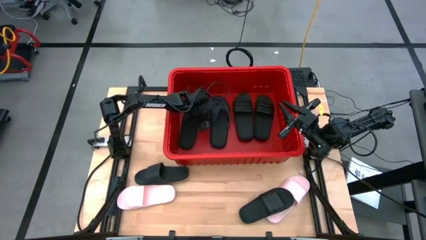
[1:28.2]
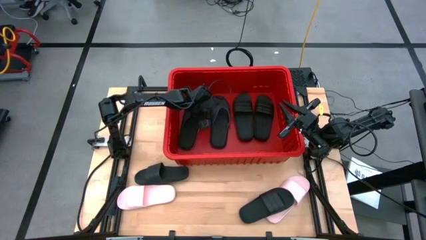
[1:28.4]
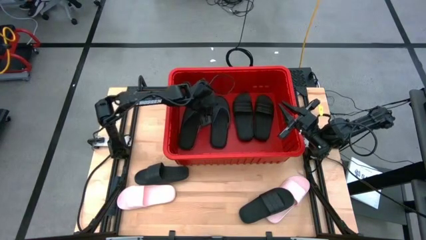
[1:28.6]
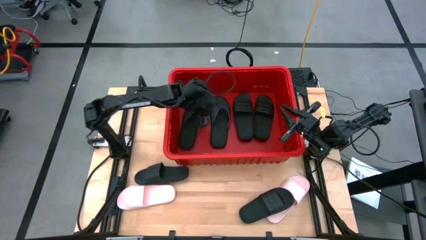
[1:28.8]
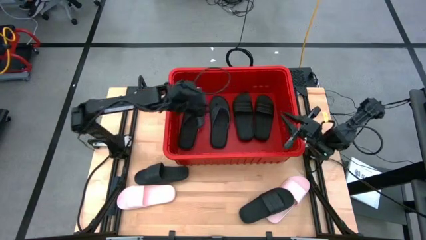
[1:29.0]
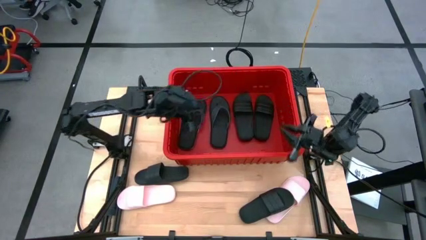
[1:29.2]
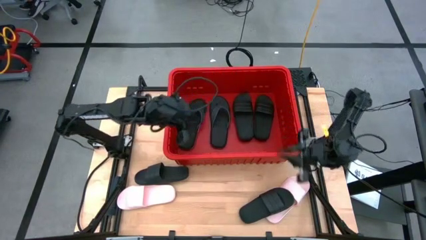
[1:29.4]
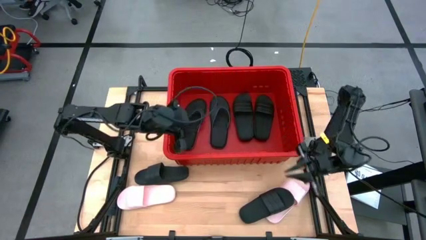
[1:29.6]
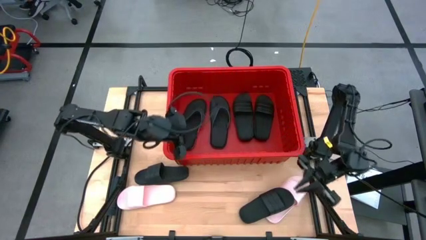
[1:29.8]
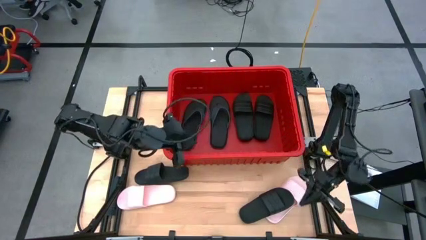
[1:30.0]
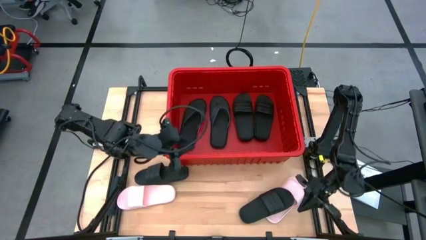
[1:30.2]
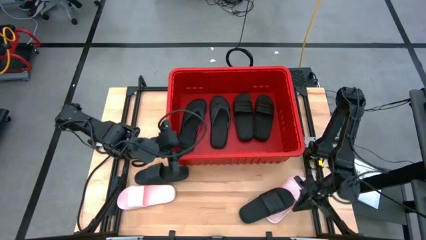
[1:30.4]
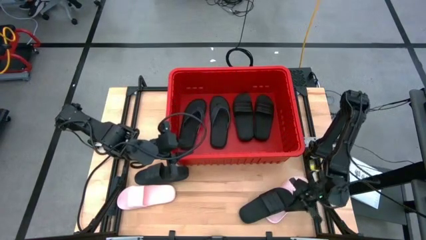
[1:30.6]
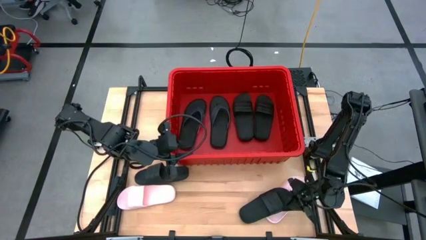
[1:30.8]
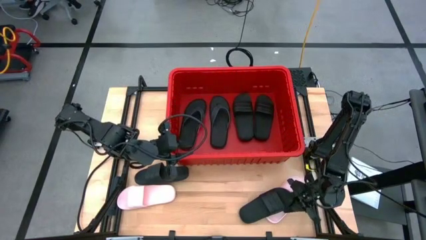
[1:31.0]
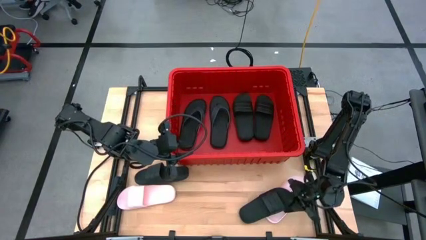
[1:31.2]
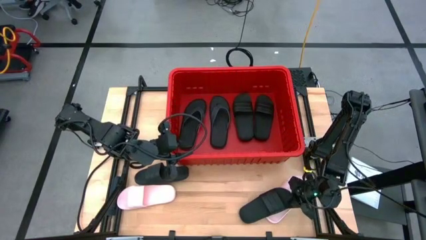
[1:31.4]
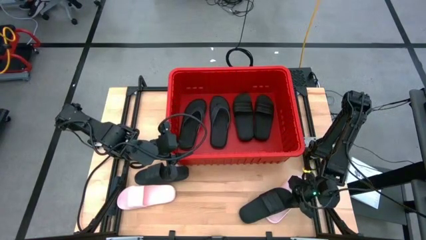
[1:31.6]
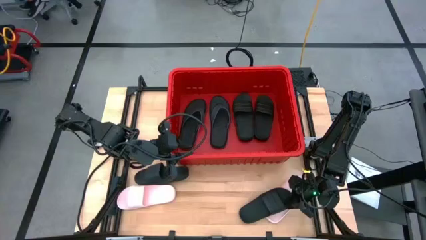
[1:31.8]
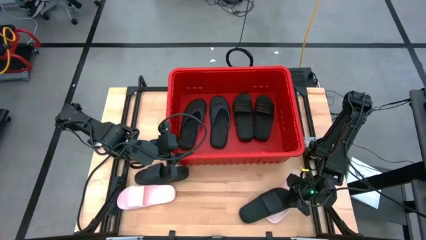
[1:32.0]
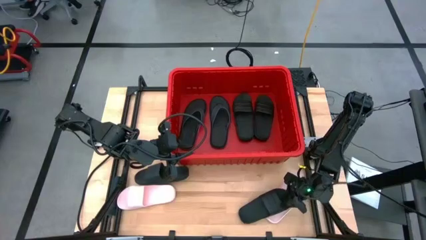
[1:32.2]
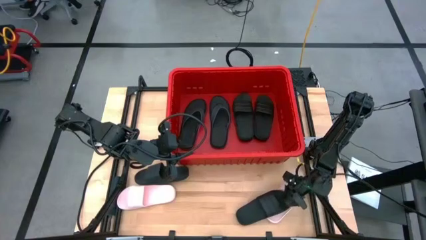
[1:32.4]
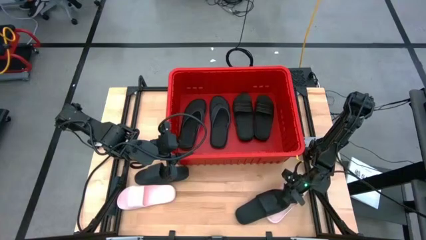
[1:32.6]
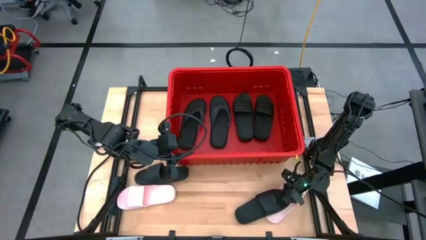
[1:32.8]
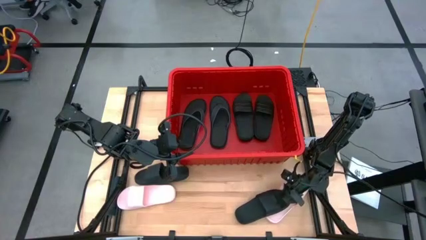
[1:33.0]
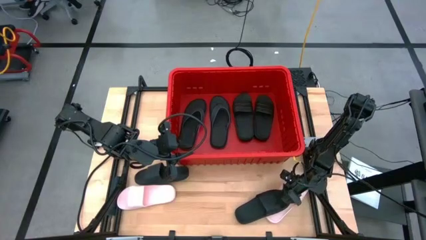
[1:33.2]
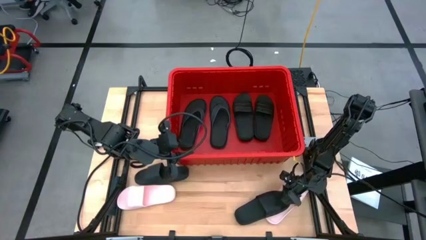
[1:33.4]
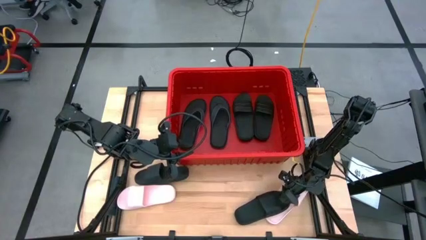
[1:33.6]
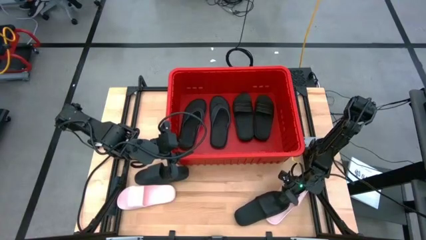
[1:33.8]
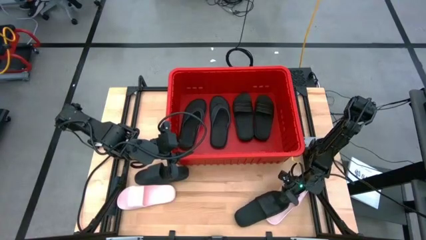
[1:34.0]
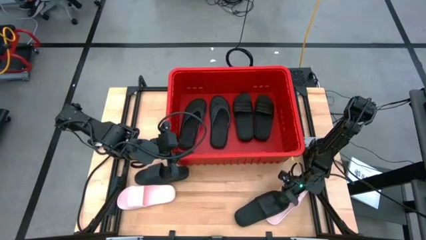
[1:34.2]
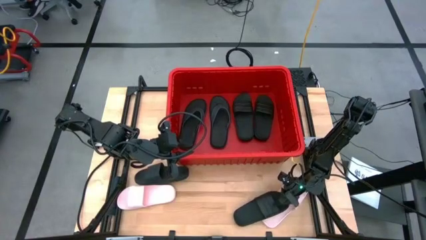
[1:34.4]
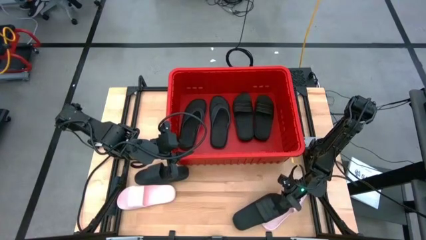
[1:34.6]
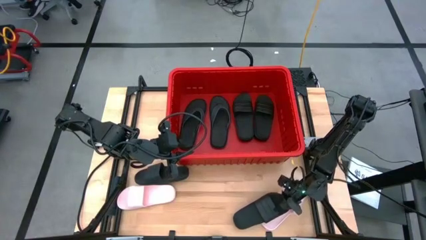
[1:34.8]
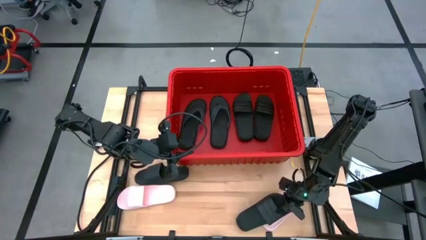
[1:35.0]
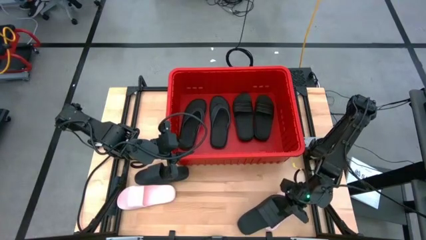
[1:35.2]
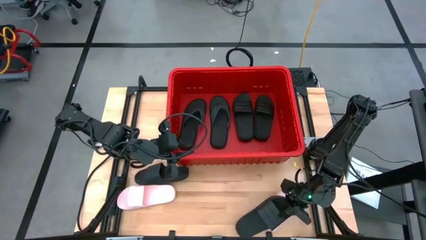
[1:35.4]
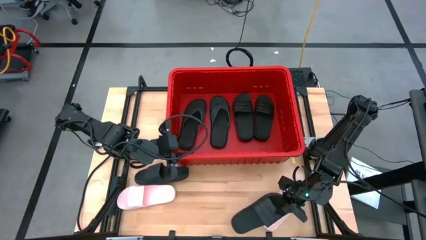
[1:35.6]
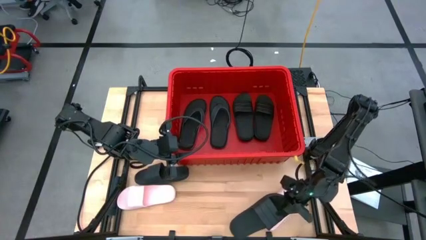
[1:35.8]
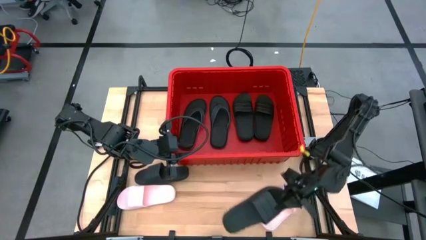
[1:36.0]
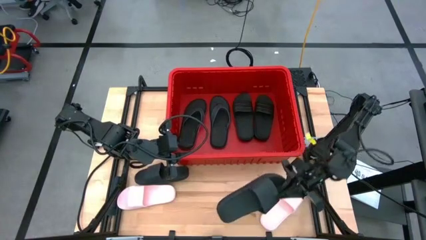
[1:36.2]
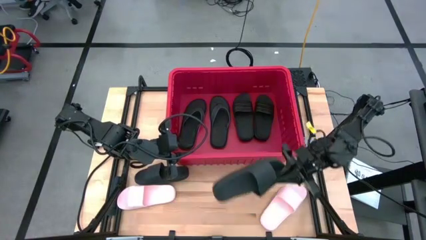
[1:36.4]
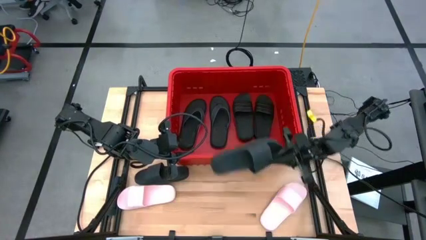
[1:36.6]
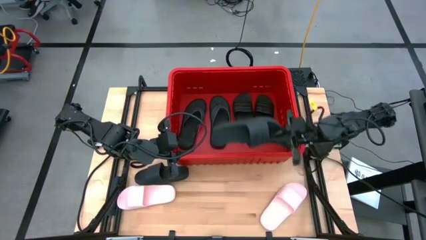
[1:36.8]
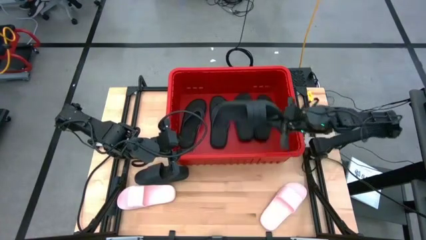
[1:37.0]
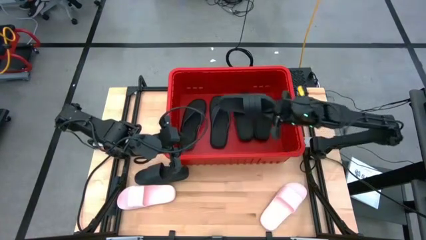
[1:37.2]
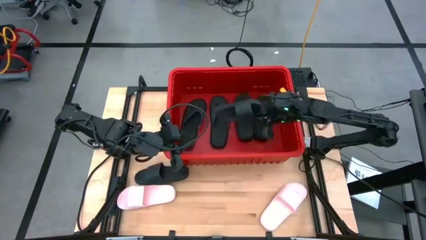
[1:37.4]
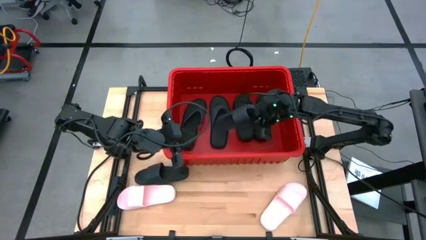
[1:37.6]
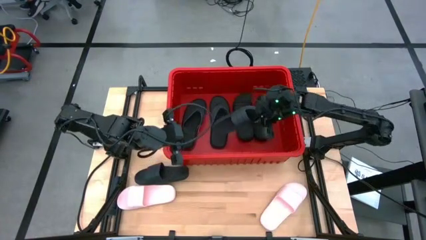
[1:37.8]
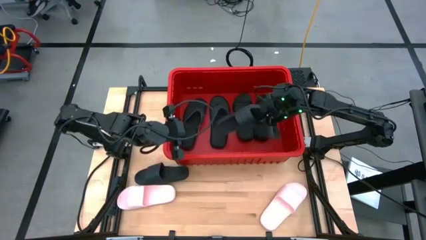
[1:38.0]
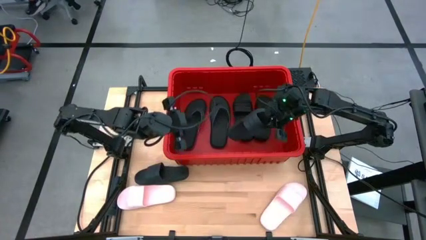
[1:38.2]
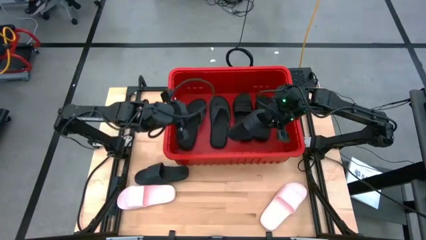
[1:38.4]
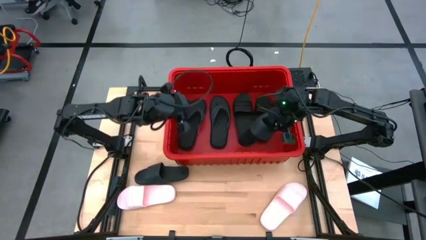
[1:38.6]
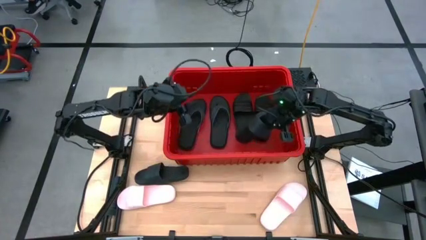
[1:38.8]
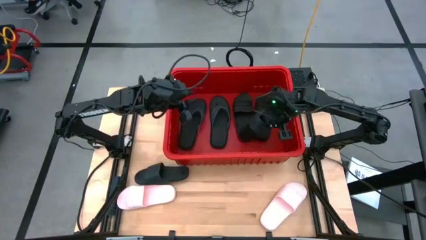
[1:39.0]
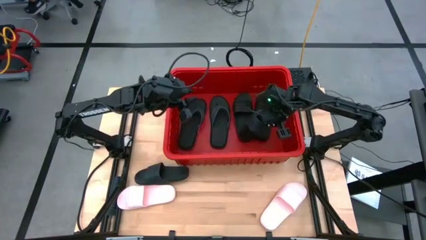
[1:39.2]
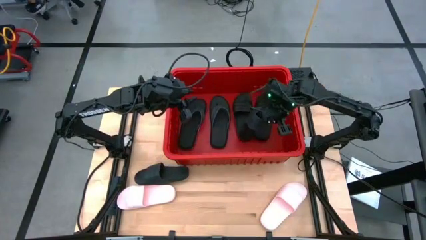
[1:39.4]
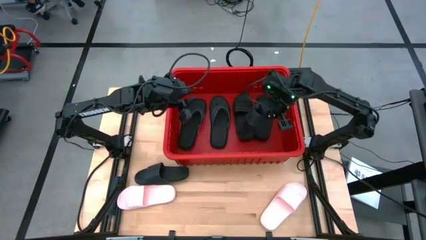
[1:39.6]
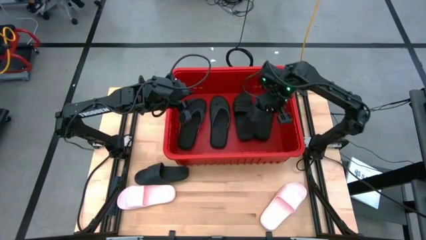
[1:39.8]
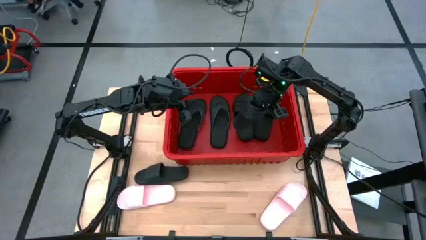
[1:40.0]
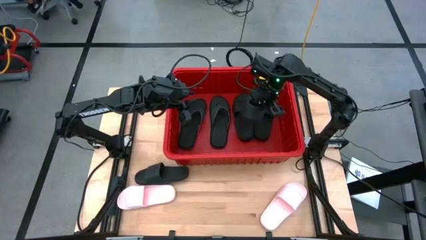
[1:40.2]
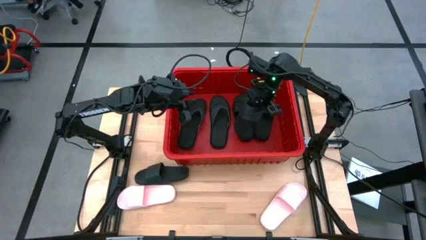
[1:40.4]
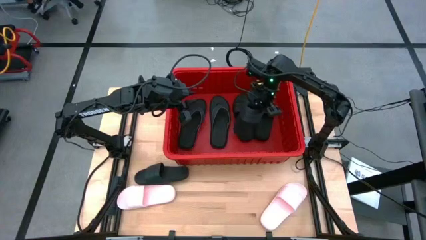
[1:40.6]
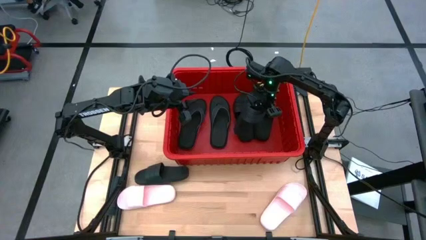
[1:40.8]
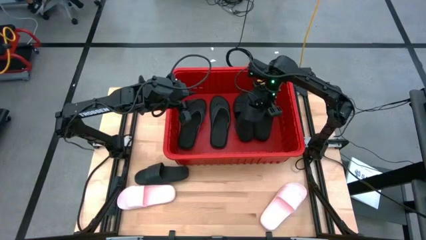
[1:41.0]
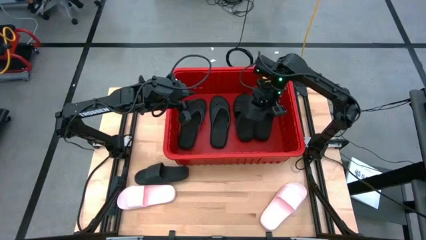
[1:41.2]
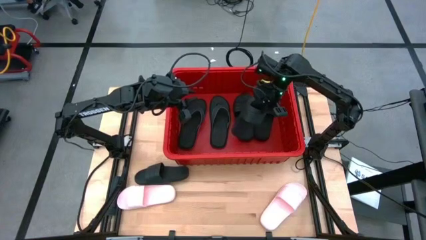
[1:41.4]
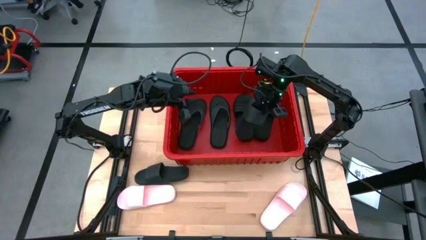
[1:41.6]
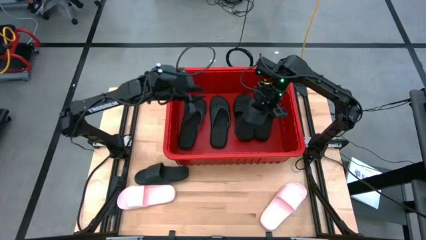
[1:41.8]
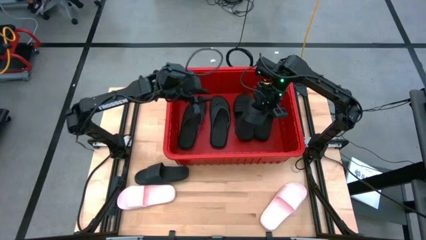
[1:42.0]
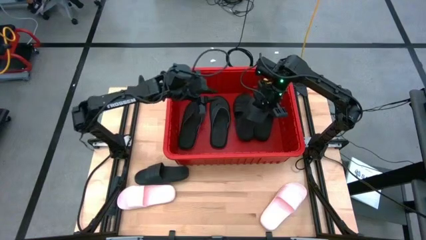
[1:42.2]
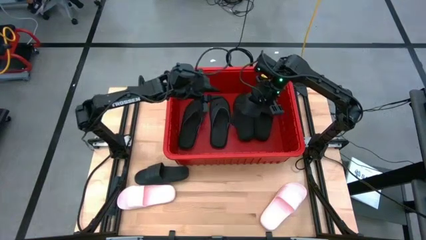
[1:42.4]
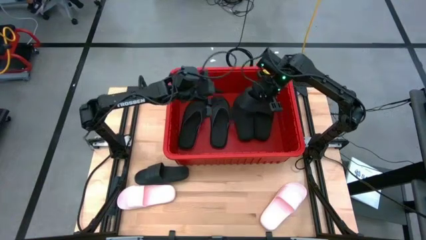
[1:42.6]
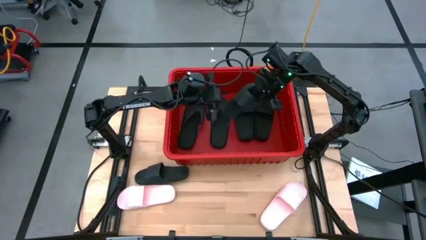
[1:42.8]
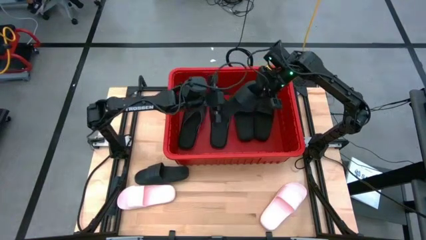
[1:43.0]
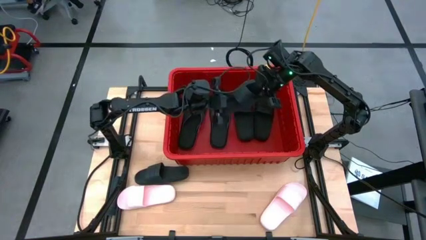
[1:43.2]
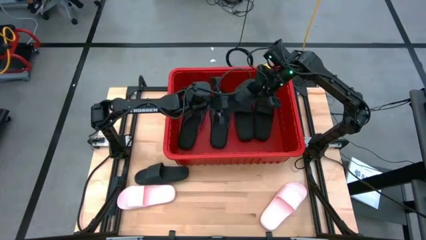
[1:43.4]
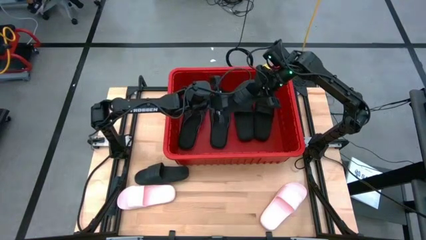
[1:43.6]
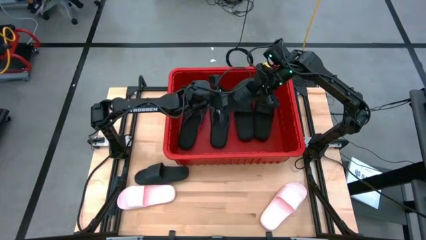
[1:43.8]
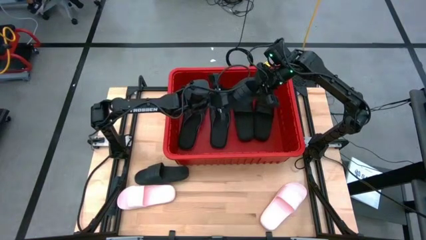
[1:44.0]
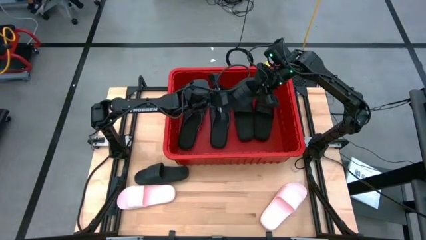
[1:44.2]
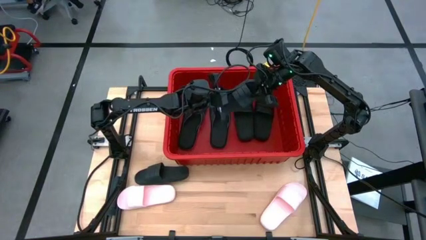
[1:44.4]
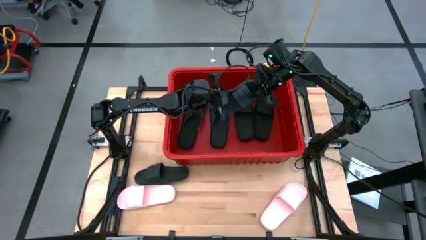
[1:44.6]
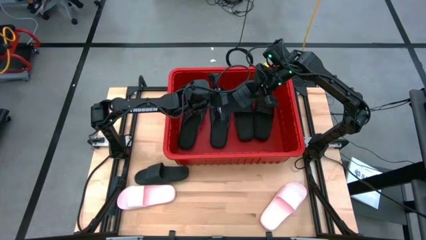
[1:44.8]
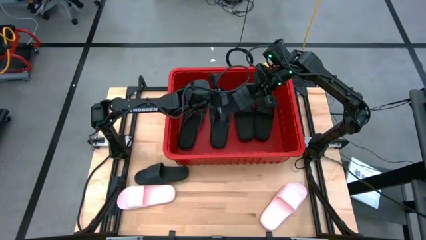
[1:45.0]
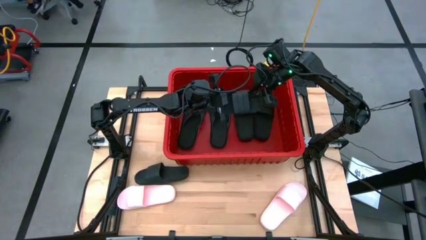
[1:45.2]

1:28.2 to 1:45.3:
Task: Pick and place slides into bin
Put the black slide into the red bin
